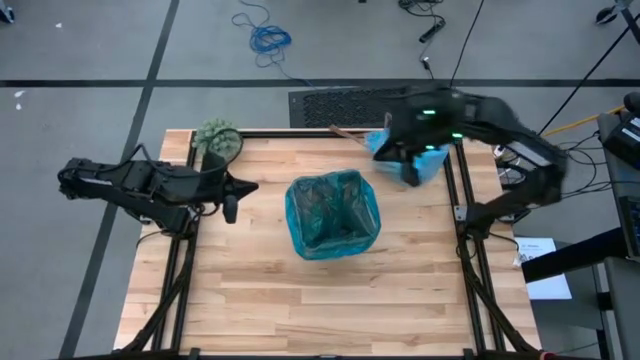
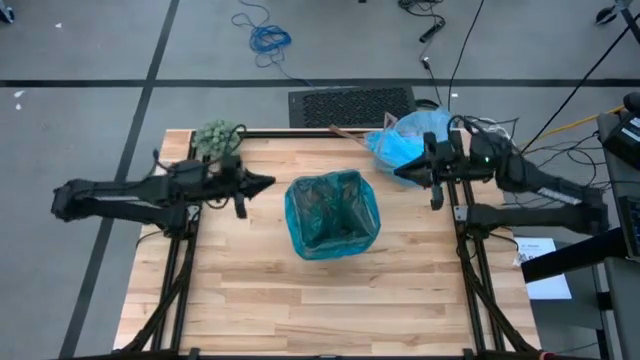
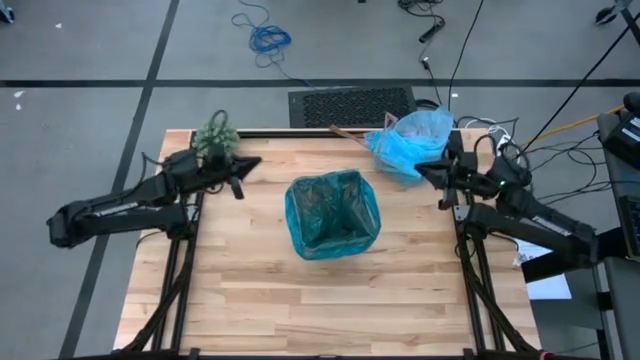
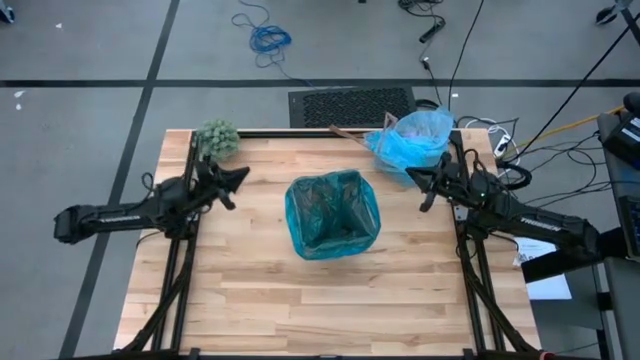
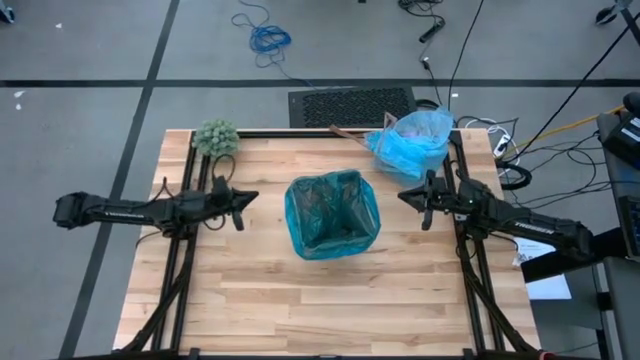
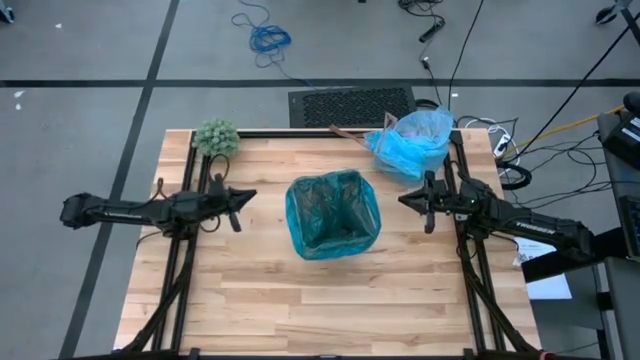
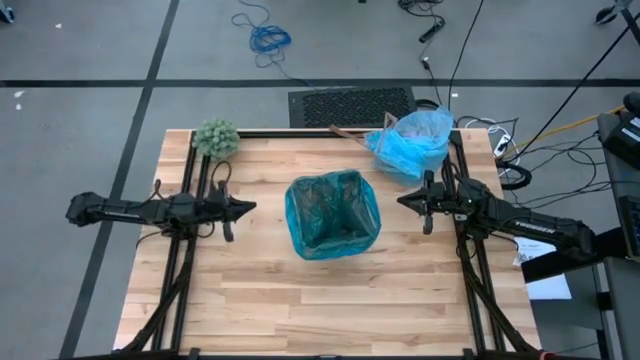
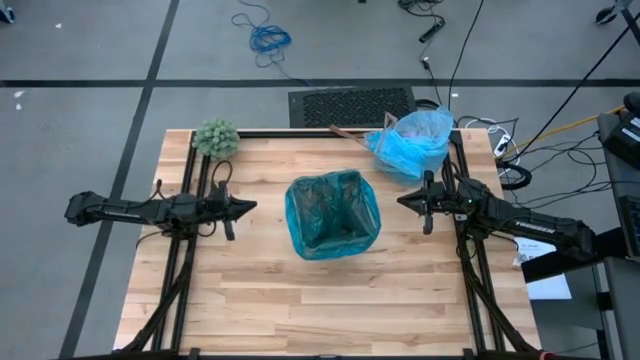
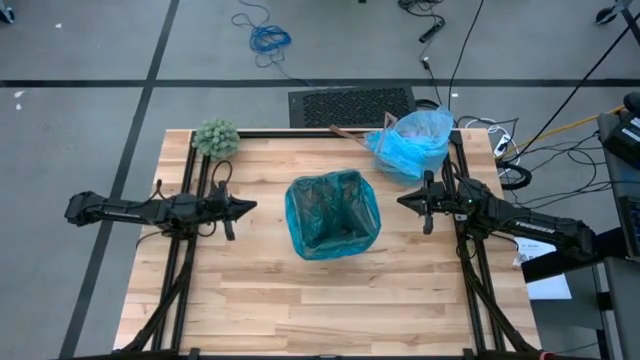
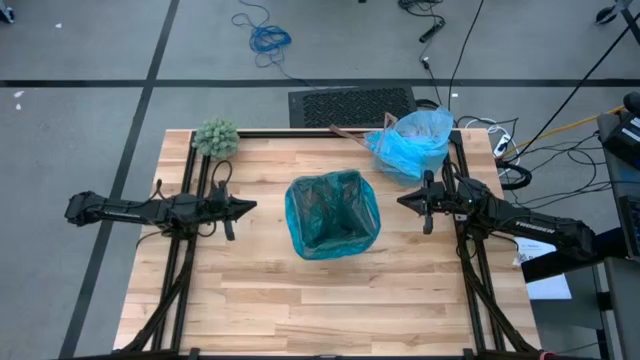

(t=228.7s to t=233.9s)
Task: place trash/remove bag and relplace
Return to Home Position

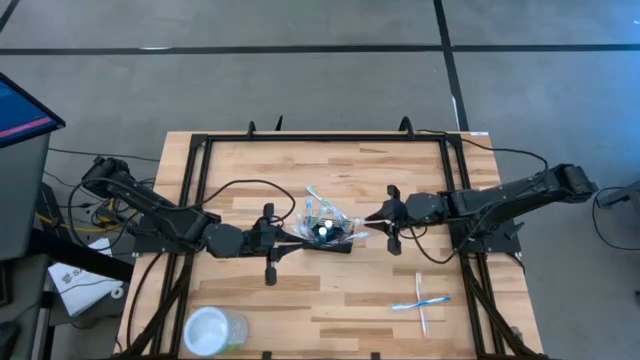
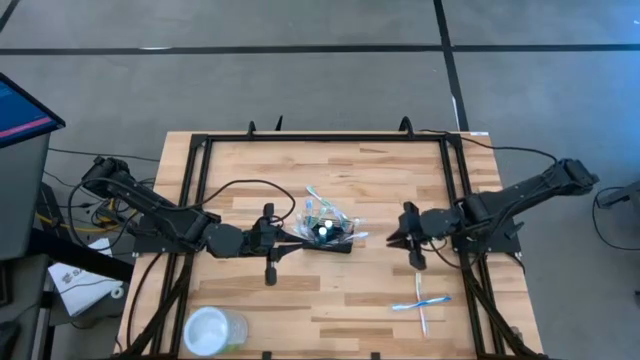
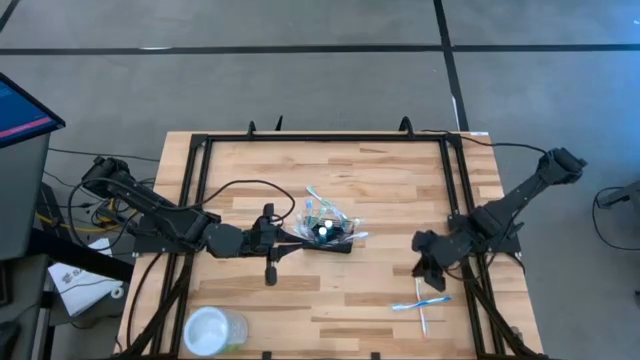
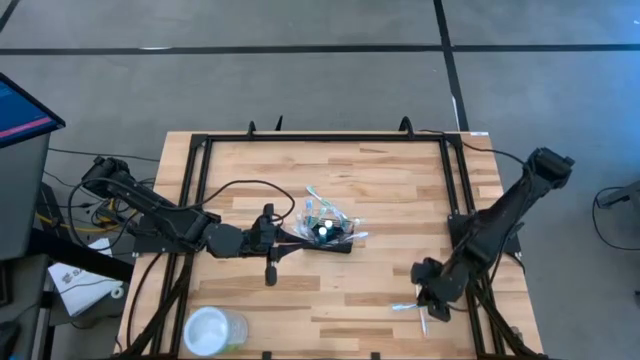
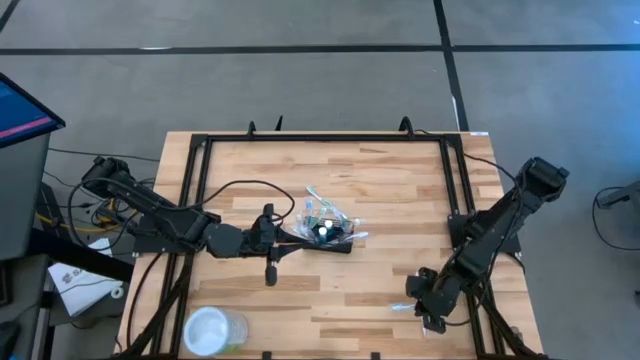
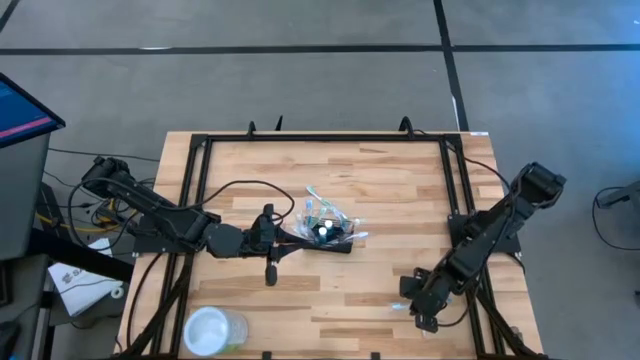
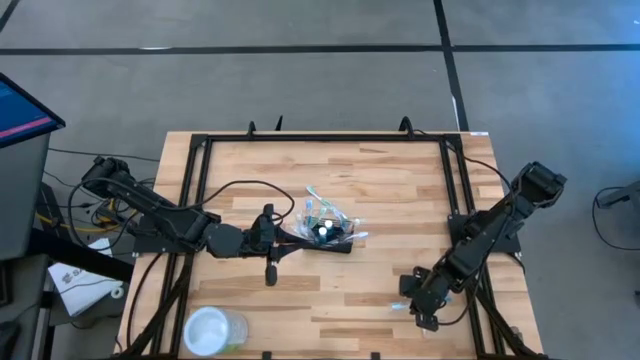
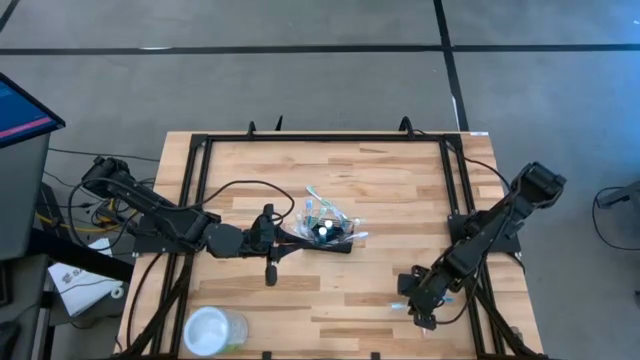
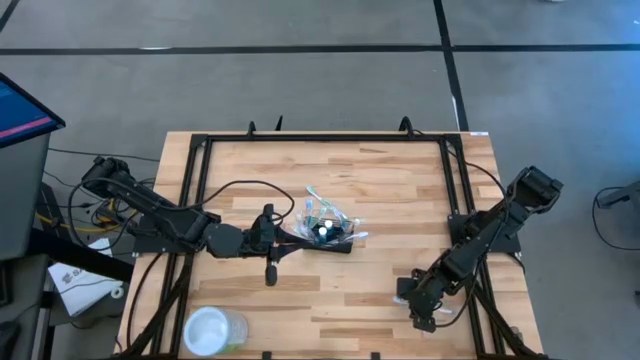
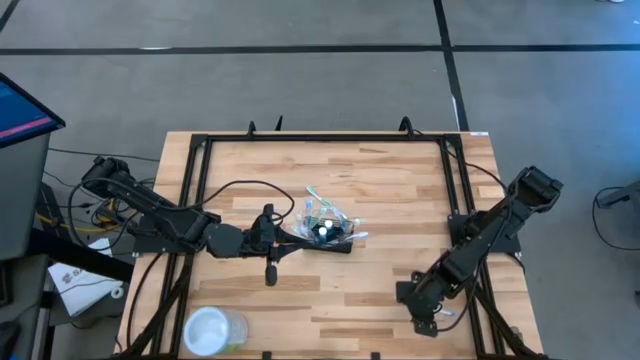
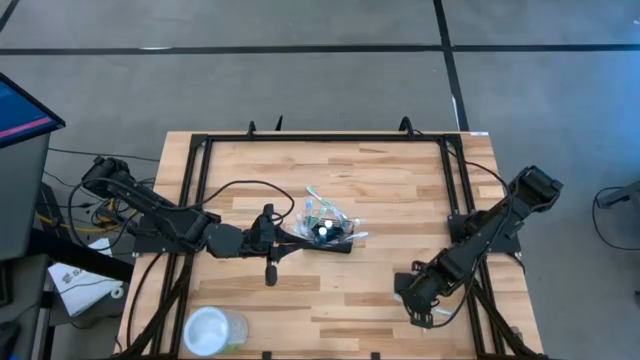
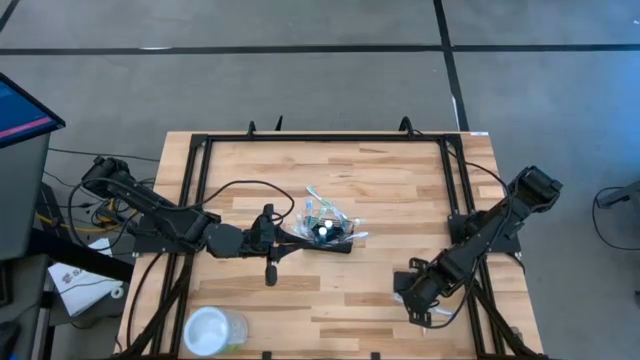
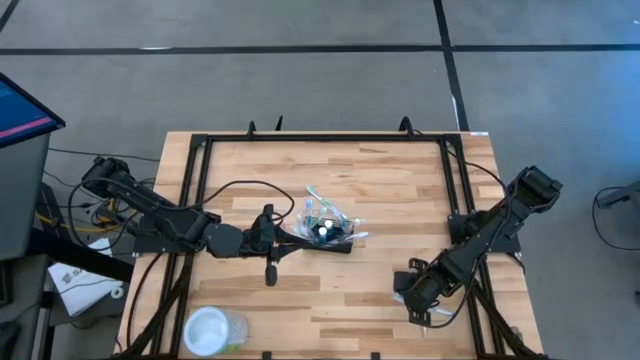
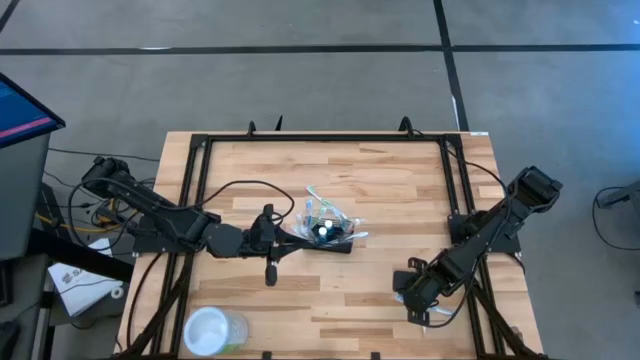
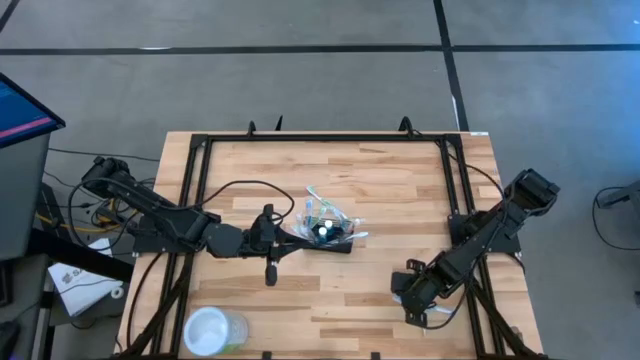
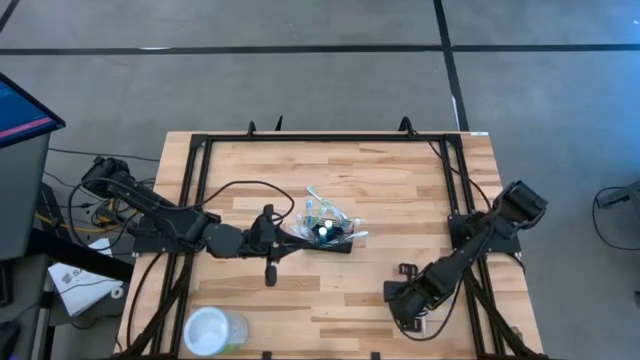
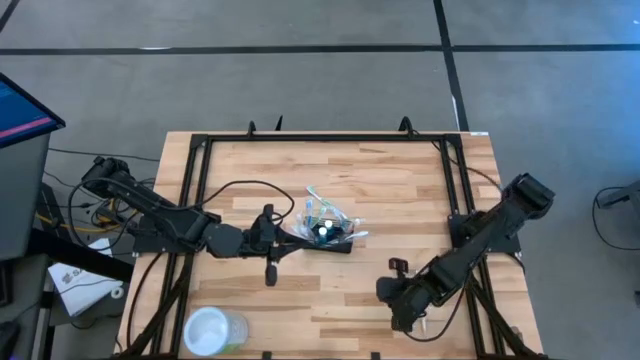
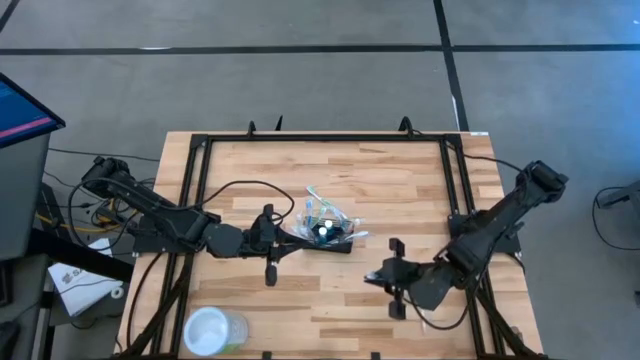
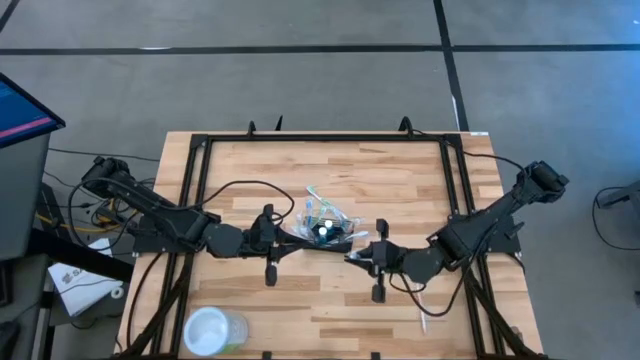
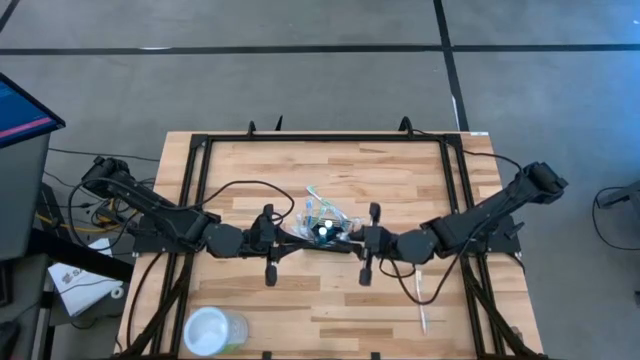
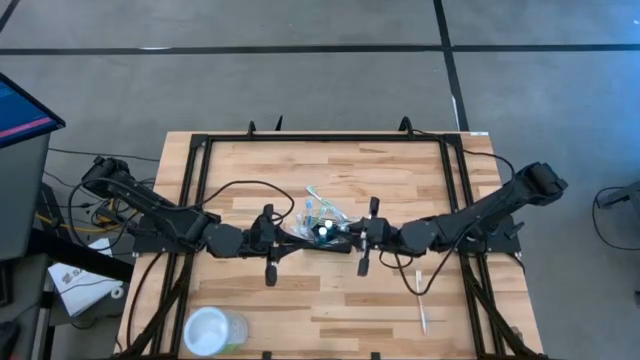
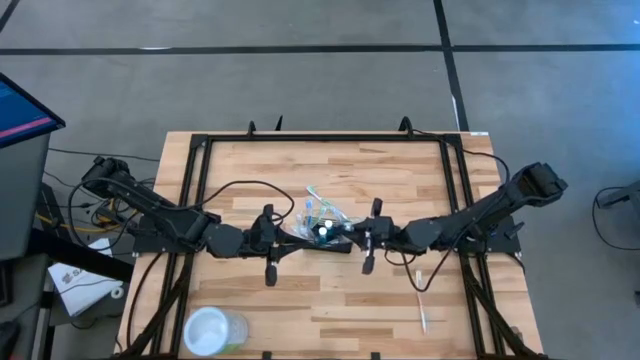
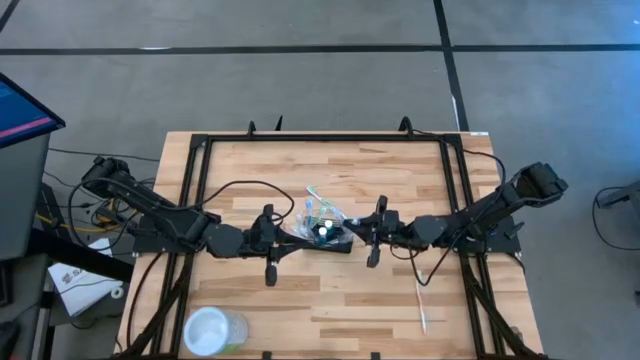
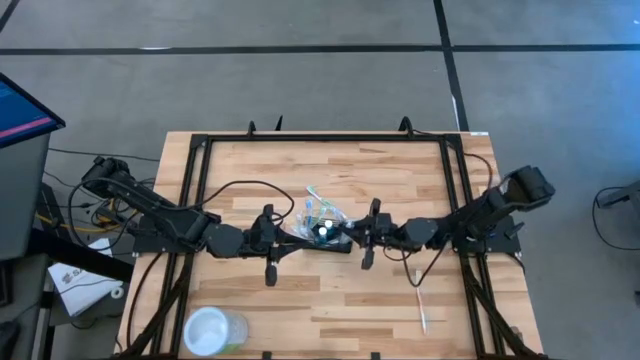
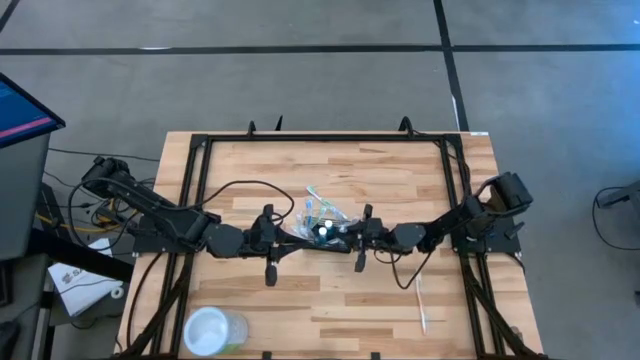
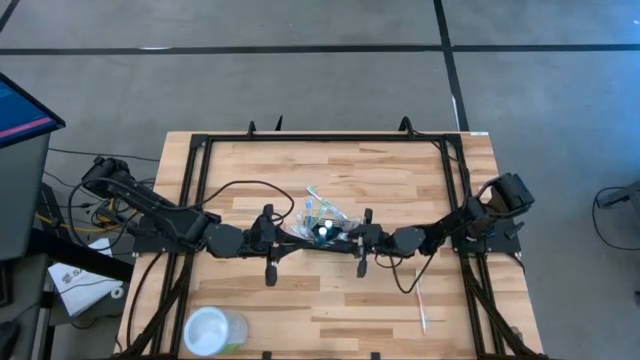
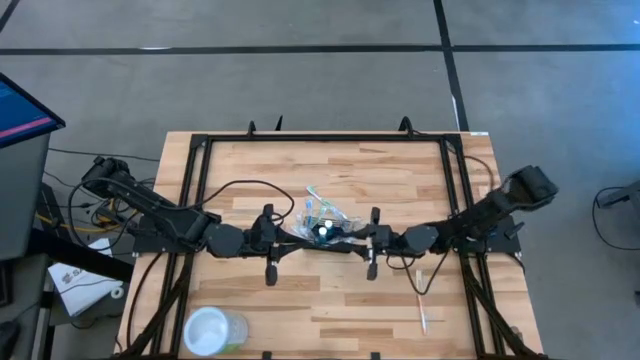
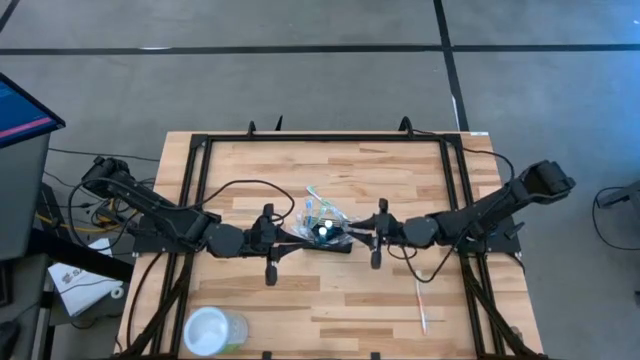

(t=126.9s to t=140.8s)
Task: Pick & Place toothbrushing station
Put the blue toothbrush into the wire organizer
